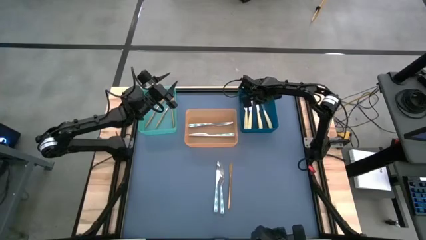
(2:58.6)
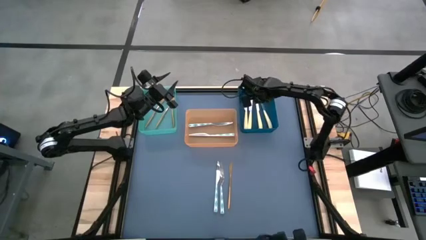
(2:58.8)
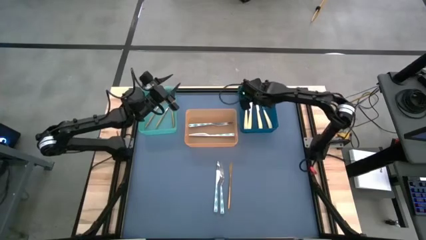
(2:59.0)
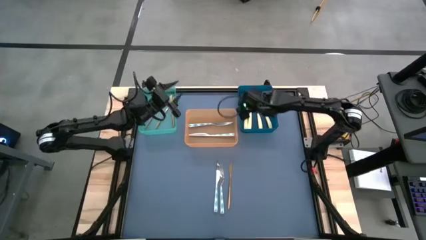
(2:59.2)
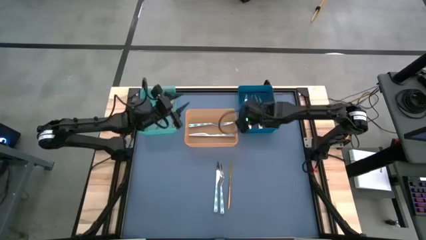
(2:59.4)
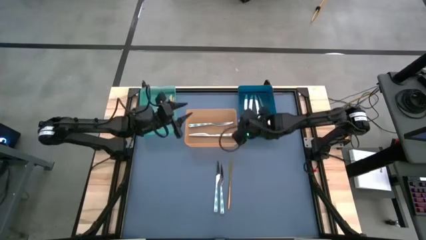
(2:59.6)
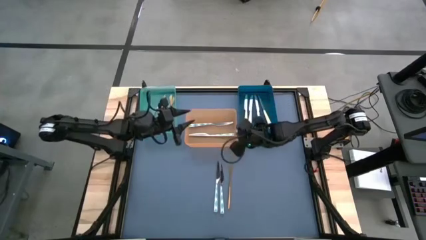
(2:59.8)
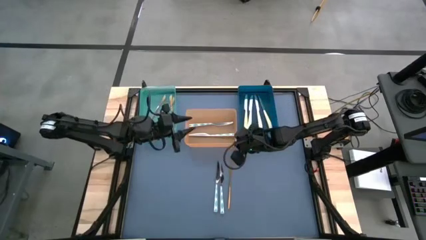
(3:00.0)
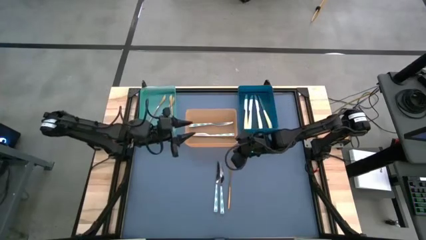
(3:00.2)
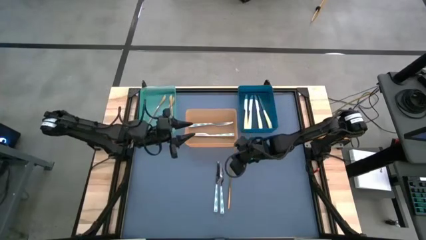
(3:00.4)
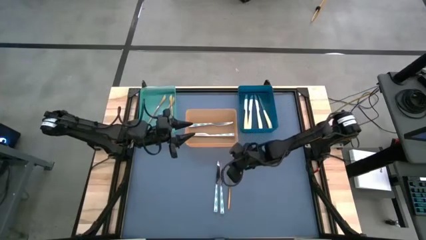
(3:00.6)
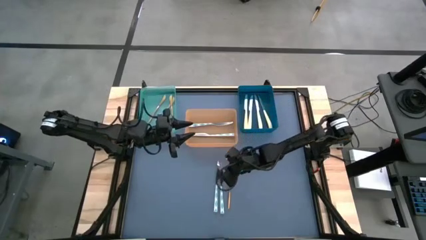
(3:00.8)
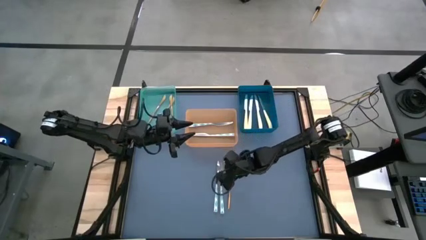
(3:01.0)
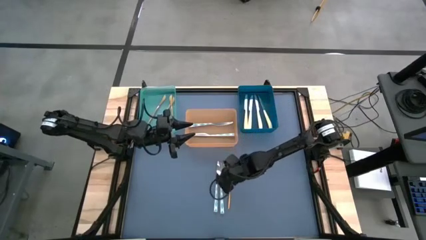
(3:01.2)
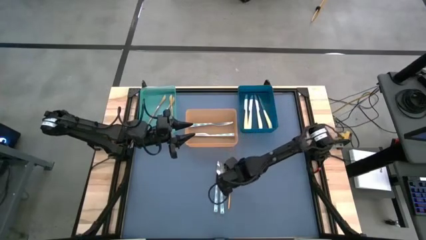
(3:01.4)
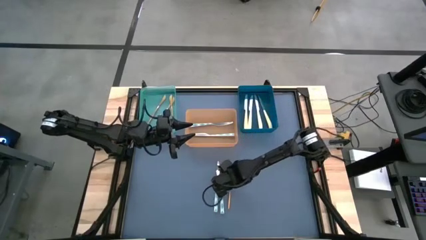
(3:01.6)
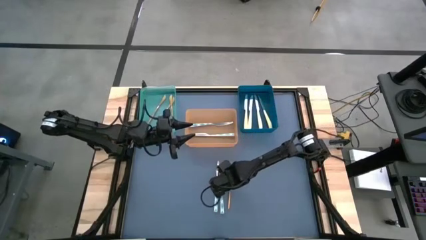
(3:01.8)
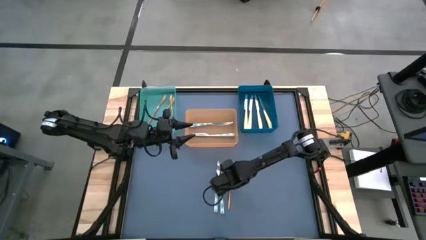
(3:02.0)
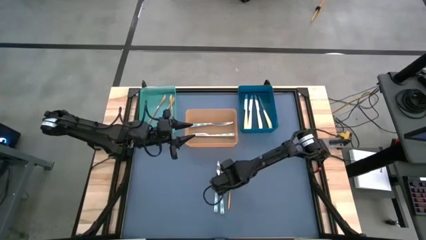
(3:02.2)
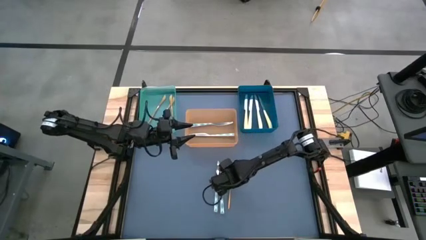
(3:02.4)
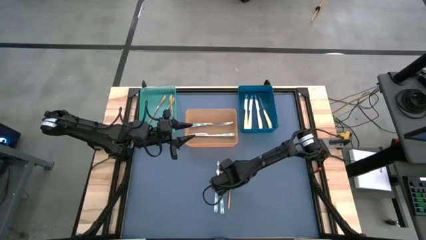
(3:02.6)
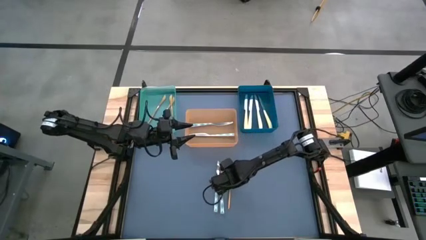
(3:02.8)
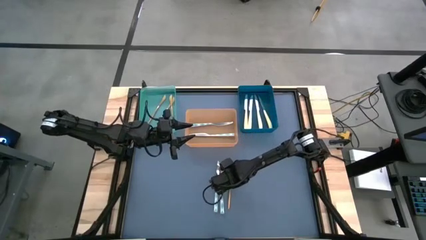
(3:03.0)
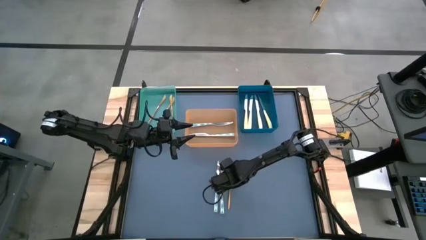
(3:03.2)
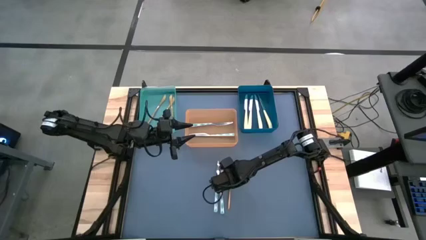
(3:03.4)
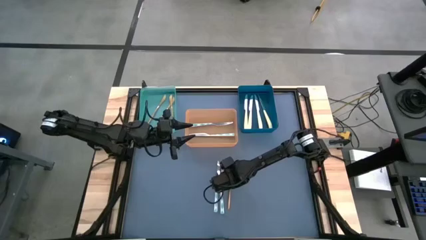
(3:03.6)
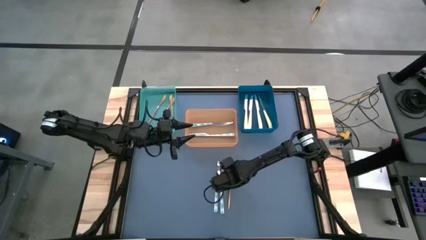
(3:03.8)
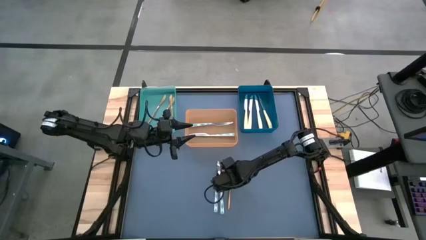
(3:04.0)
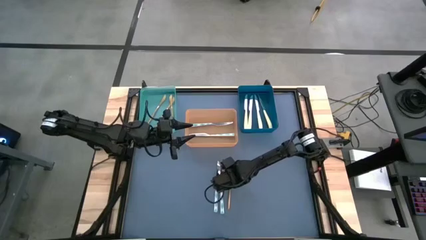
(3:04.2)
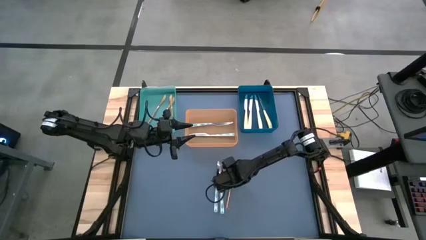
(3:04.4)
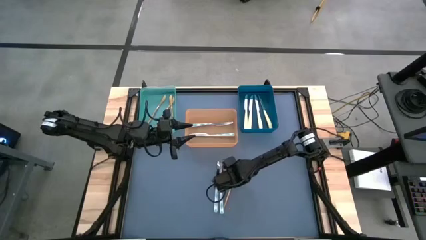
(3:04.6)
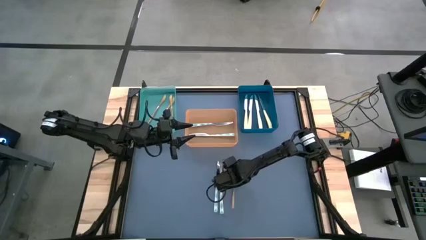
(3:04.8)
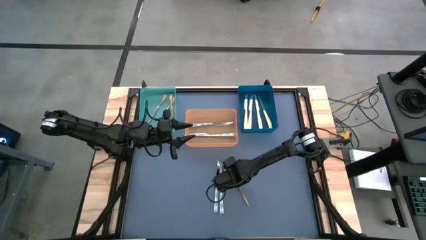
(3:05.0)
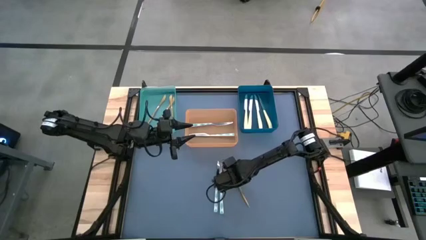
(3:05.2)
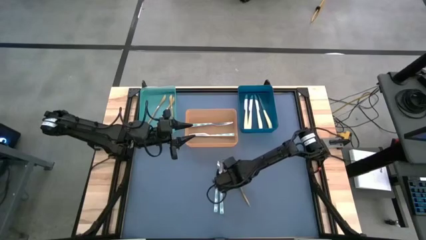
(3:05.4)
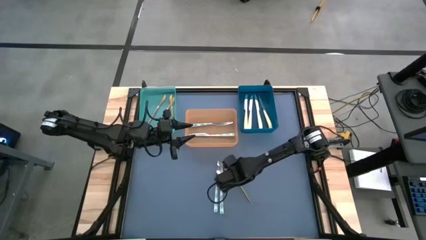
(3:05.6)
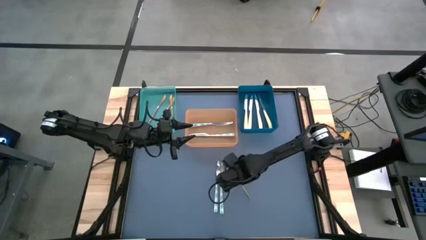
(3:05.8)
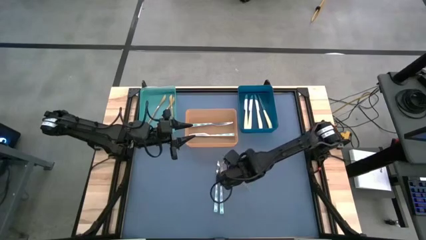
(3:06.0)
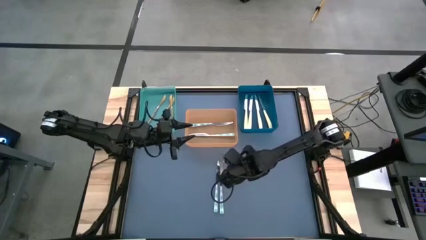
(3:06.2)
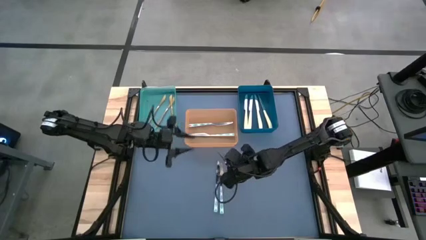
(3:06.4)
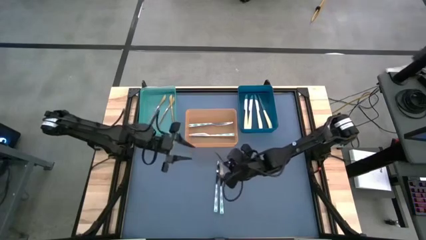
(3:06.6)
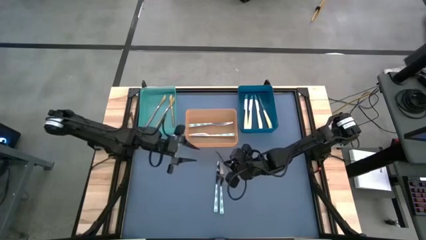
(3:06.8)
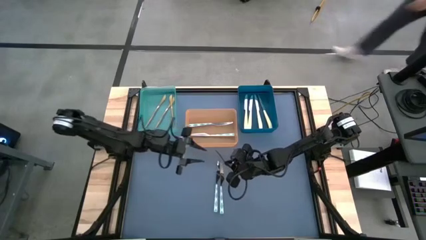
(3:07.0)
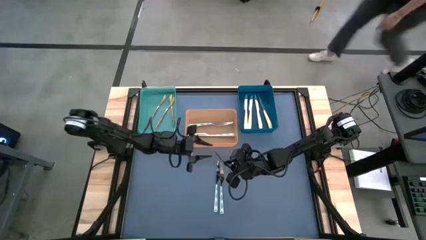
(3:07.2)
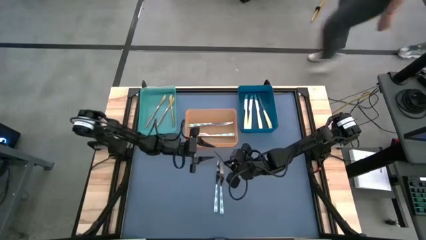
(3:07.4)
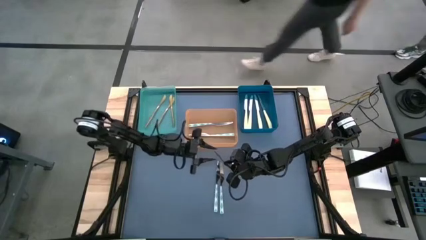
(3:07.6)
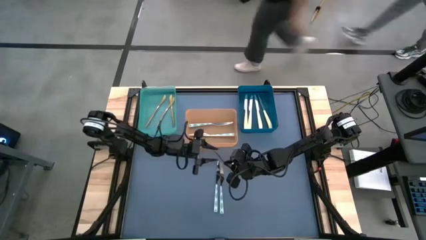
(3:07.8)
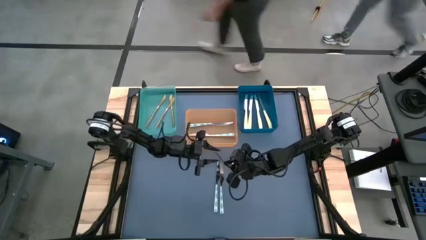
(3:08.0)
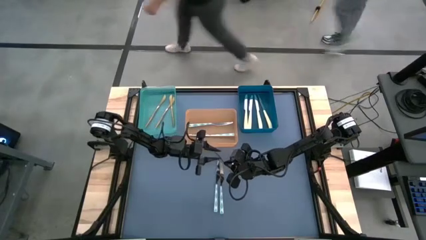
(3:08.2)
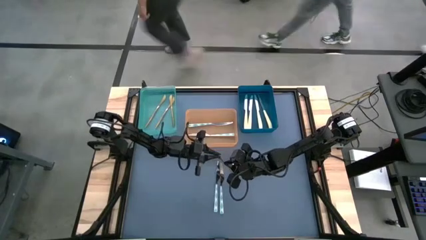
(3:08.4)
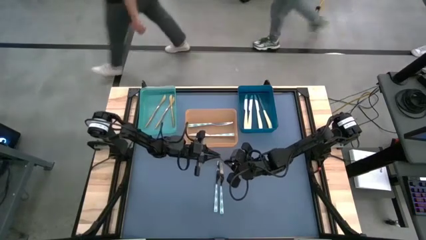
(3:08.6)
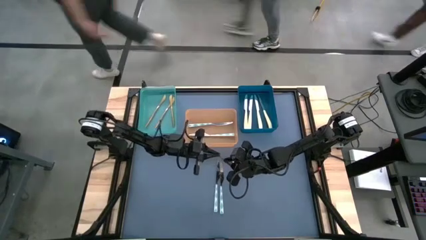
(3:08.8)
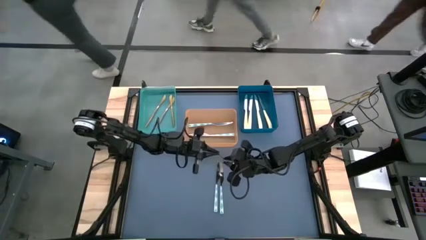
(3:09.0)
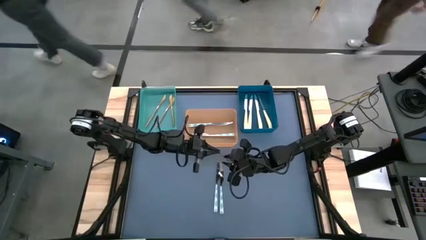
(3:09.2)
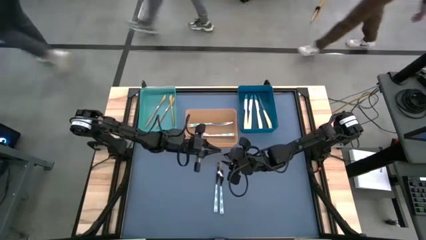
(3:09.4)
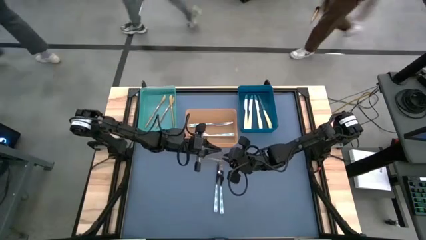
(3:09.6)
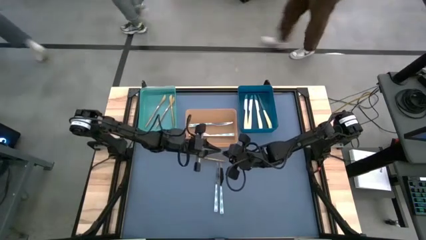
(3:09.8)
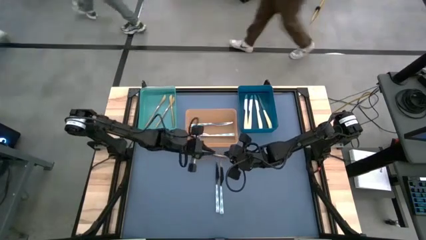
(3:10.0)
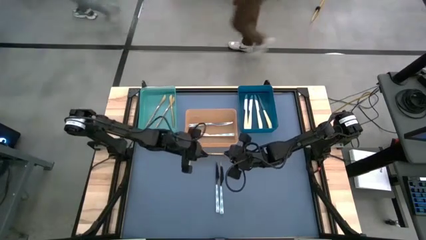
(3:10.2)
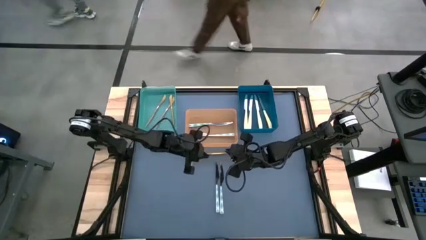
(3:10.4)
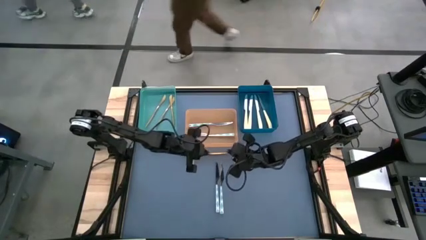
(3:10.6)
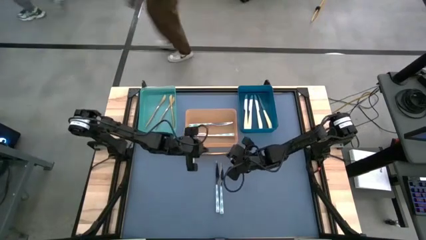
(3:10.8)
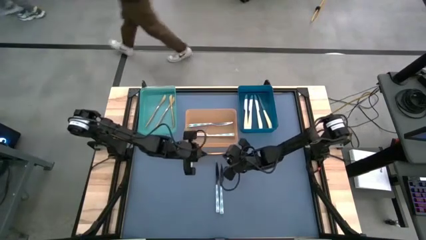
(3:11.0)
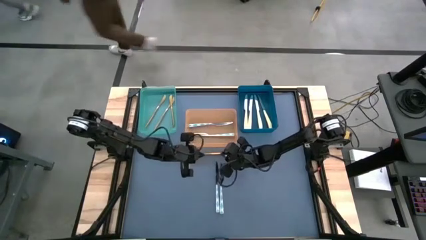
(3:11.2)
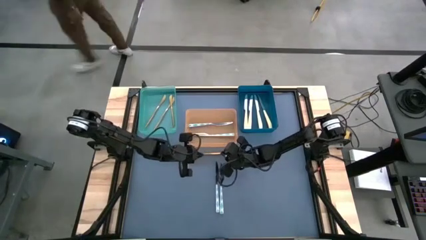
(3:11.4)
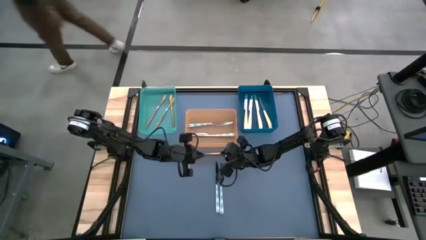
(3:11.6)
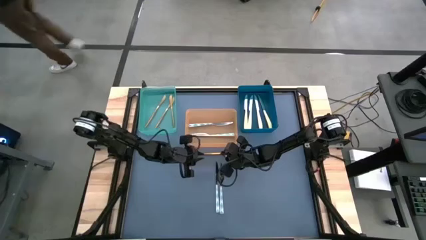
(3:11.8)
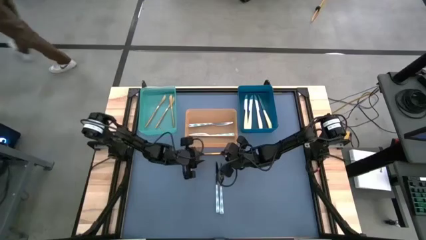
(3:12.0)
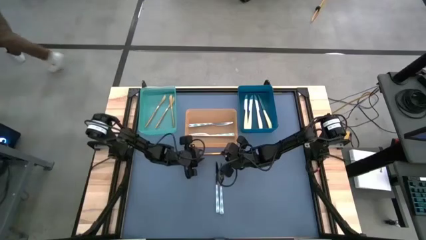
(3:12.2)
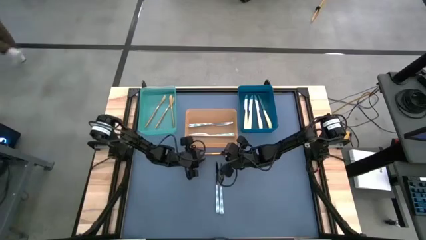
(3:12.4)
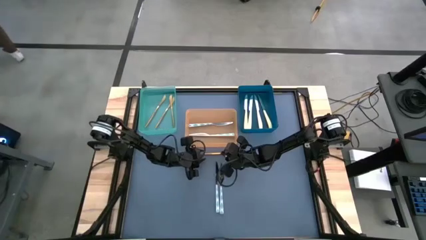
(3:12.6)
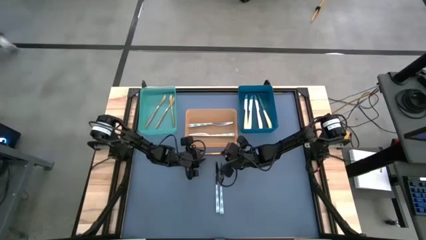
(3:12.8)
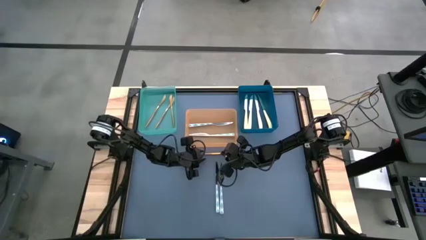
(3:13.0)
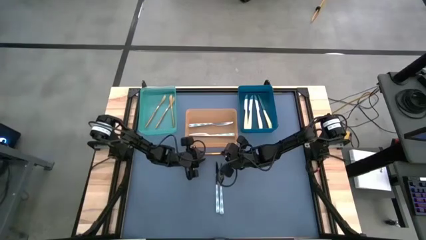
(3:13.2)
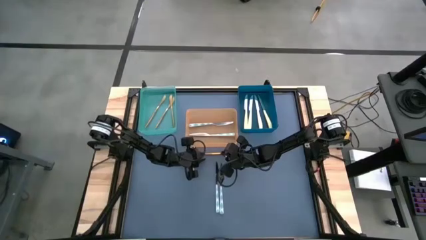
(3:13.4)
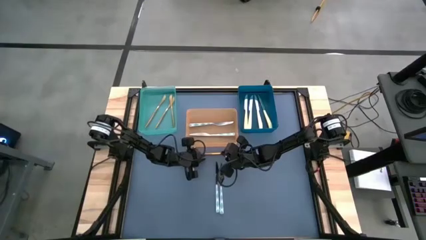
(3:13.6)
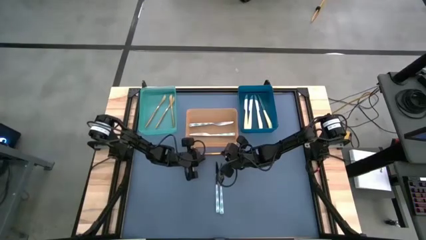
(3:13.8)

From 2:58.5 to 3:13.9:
Task: Sort silverware by color (type)
Put the gold knife into the green bin

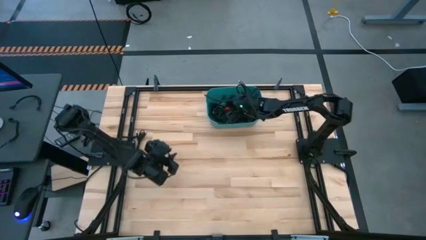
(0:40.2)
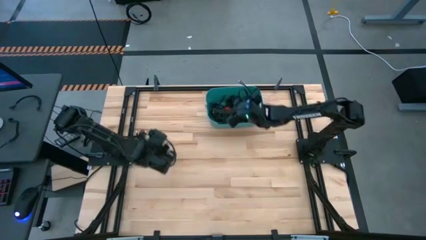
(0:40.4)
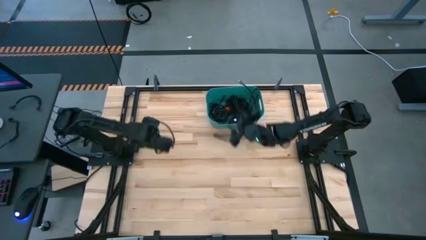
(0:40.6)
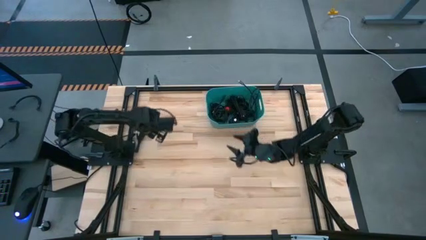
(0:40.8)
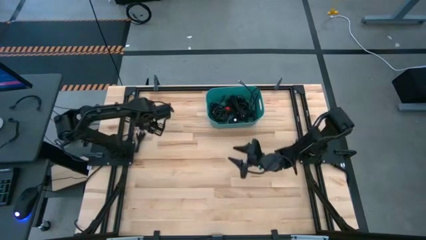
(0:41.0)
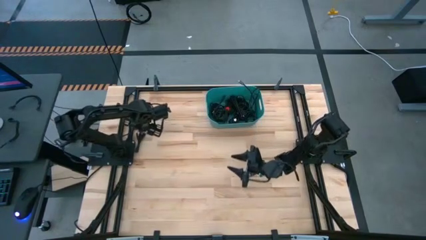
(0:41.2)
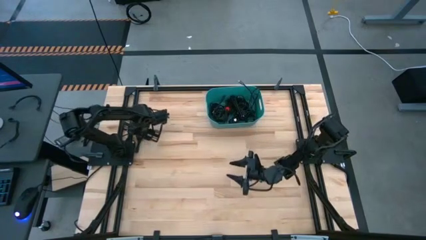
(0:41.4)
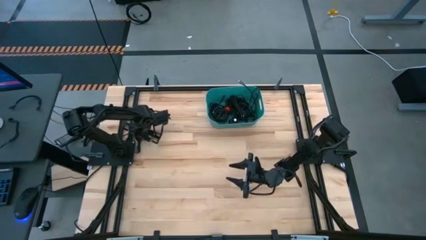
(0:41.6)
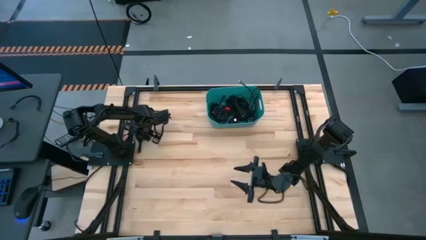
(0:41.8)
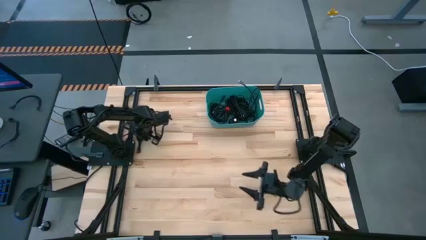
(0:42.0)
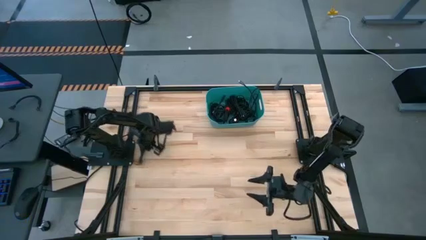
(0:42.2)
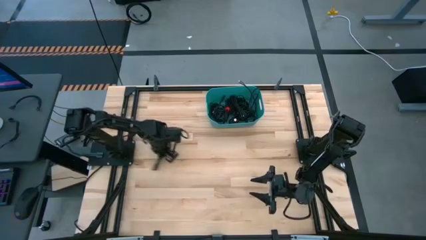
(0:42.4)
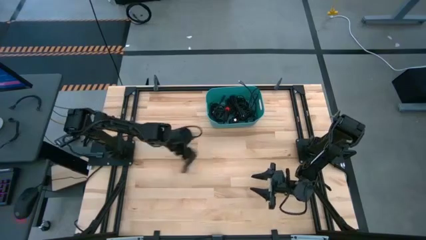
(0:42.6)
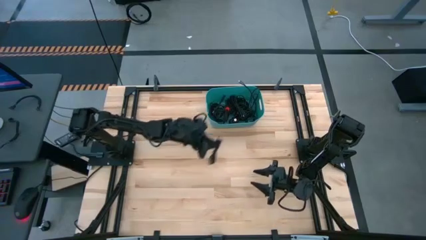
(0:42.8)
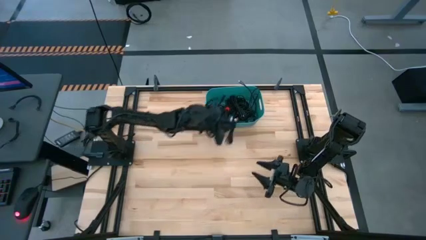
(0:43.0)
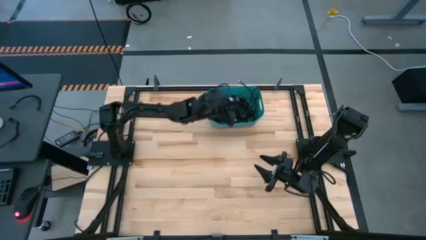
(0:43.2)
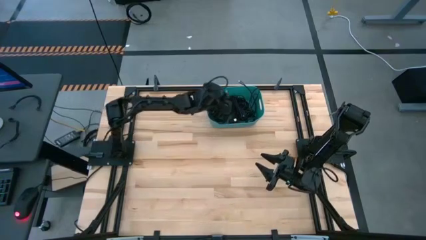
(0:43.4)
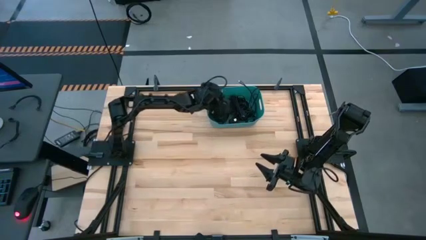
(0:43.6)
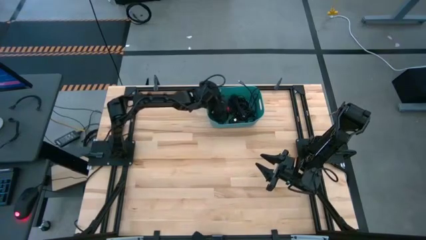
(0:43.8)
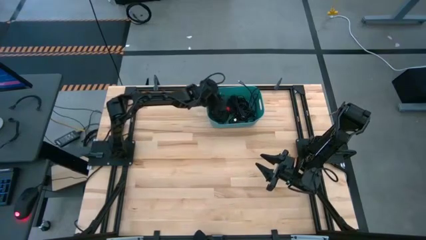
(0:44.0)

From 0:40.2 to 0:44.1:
Task: Pick and place USB-C Cables
Put the black charger cable into the blue bin
